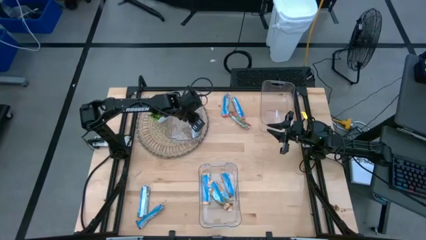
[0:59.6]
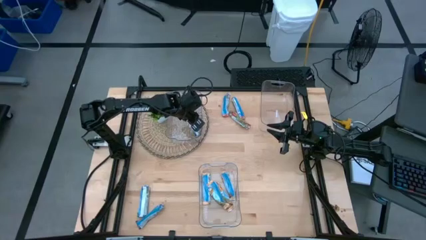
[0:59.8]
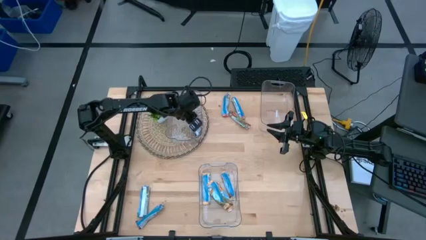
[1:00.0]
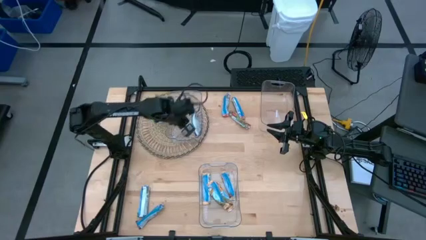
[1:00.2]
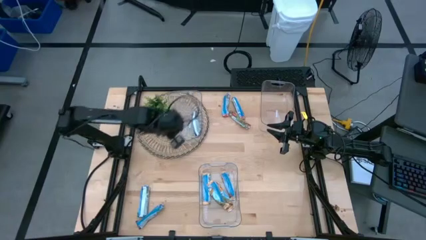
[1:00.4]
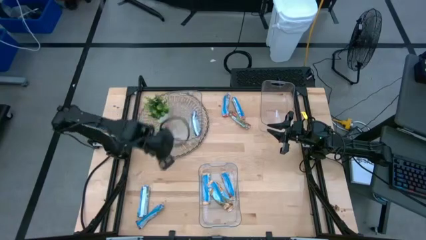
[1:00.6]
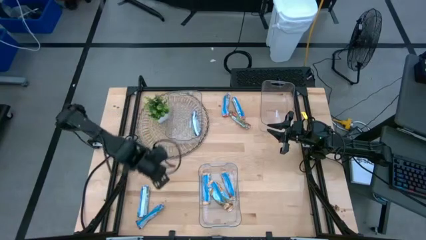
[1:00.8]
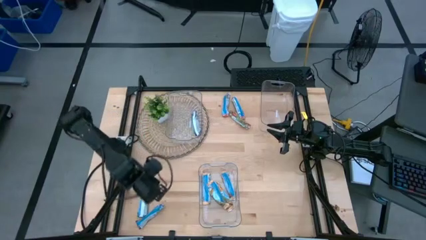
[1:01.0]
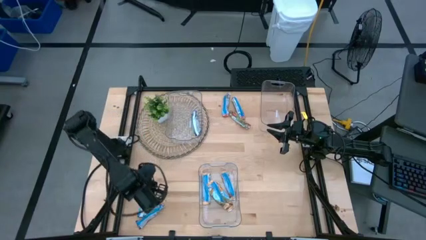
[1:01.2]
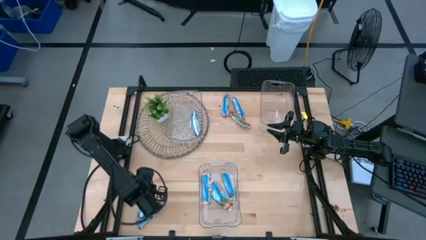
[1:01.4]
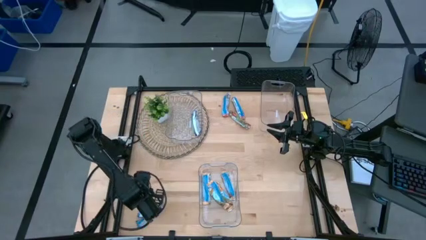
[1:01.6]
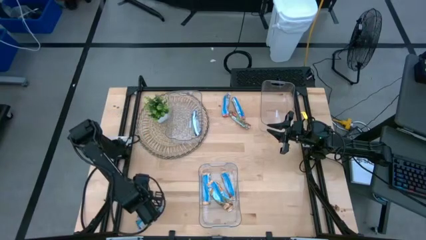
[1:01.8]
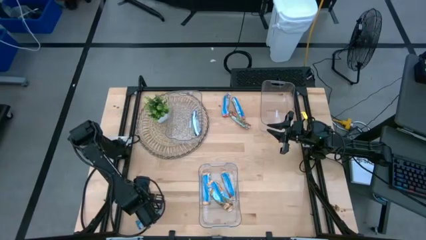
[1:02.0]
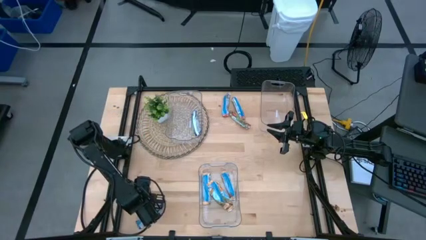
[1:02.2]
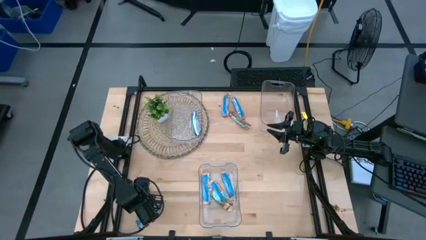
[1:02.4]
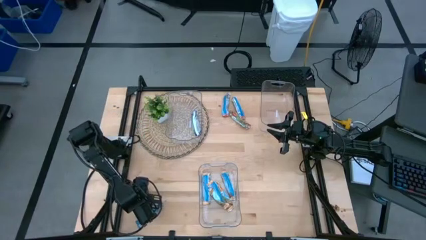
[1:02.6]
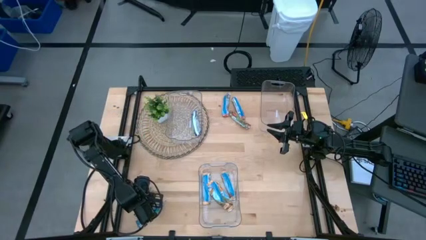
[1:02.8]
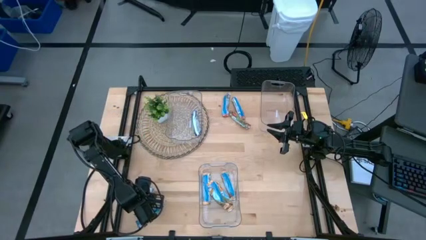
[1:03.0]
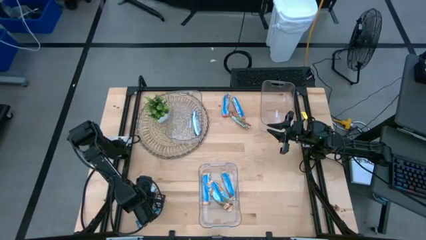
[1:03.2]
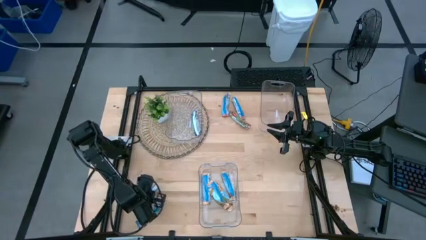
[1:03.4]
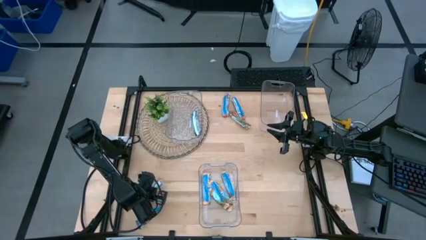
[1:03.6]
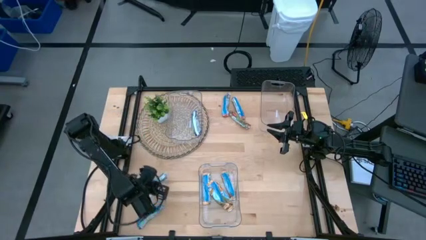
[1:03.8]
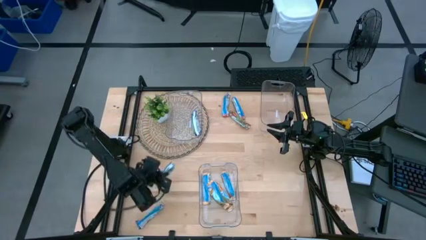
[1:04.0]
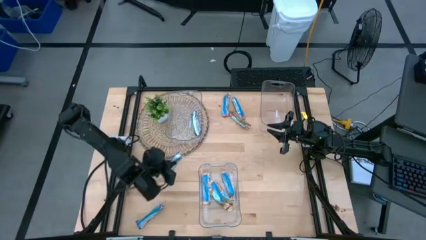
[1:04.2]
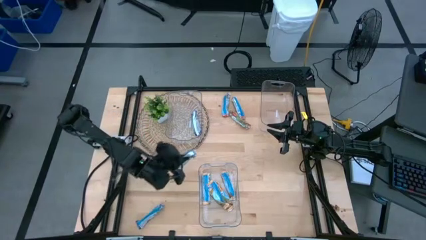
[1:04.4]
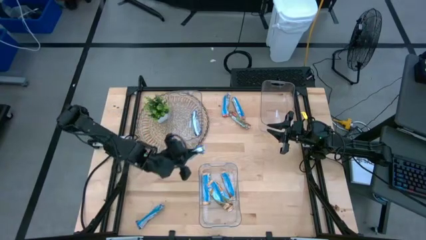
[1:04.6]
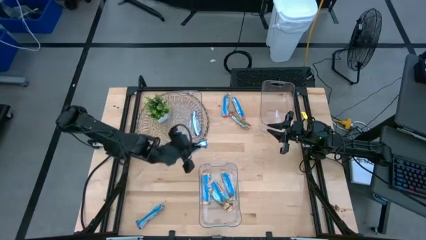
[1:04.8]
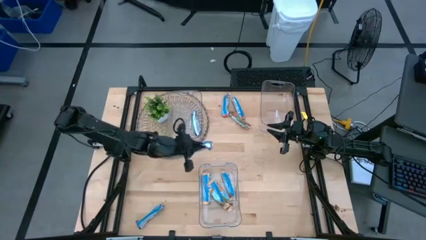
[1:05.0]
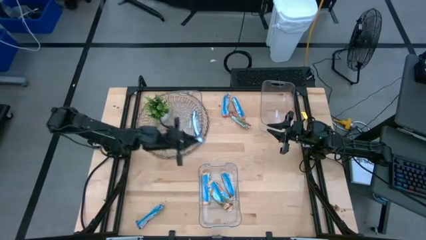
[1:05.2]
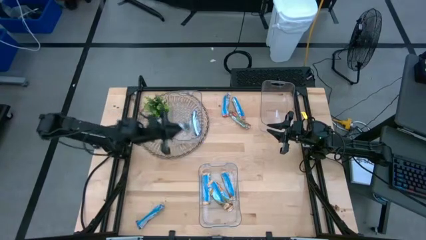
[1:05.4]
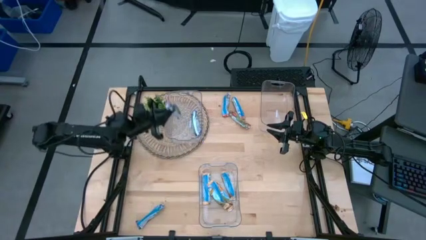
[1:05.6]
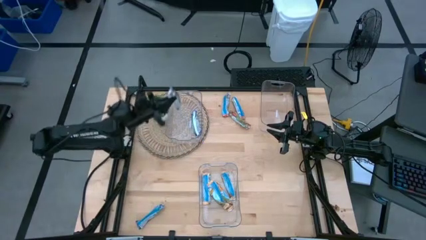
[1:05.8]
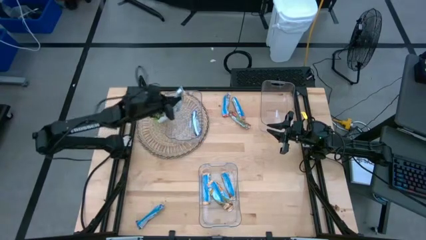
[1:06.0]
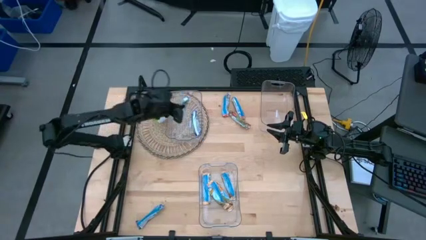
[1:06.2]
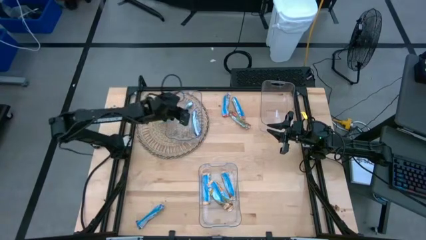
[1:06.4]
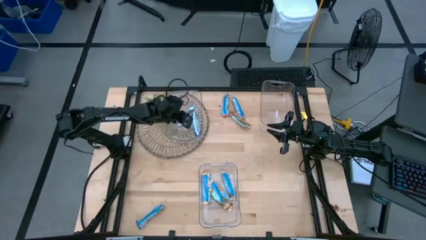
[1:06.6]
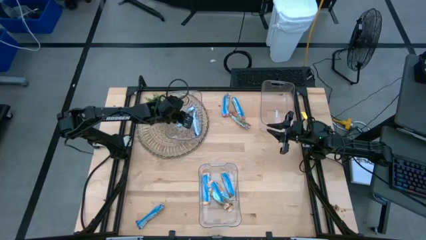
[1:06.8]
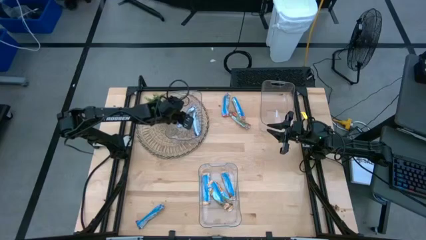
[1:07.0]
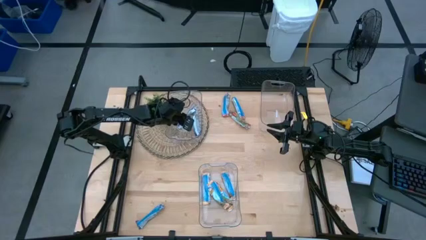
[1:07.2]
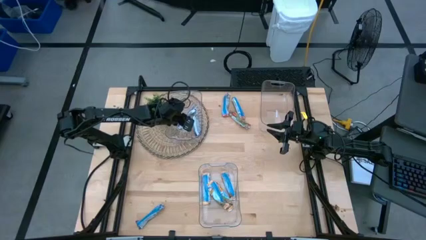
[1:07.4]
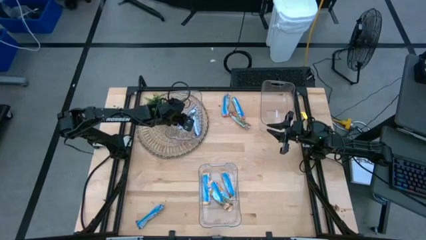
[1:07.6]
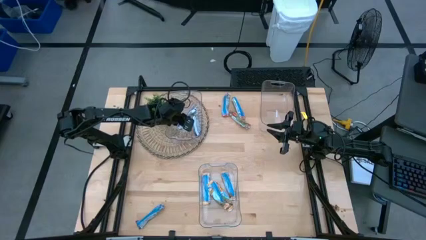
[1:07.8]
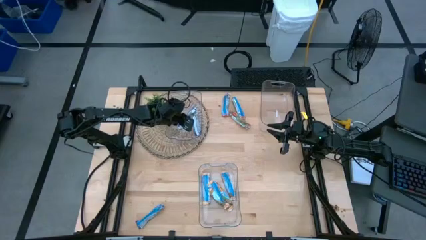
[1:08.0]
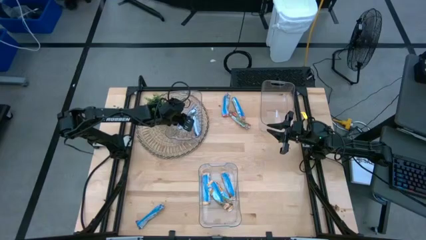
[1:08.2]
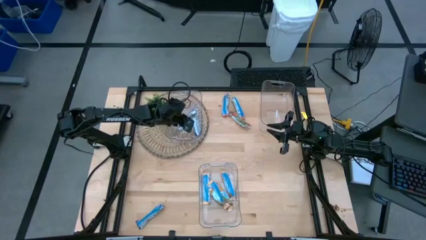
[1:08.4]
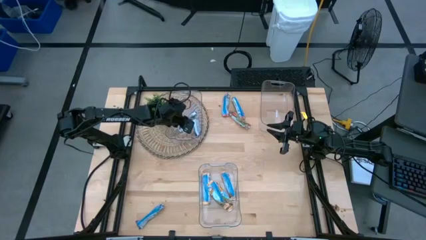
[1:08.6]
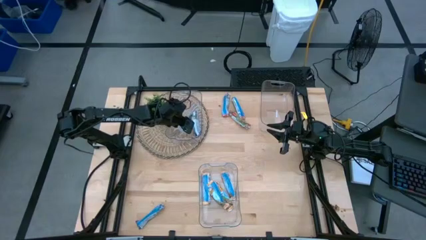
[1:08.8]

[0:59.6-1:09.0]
Task: Pick and place Granola Bars by type
Put the blue granola bar into the top left transparent bin

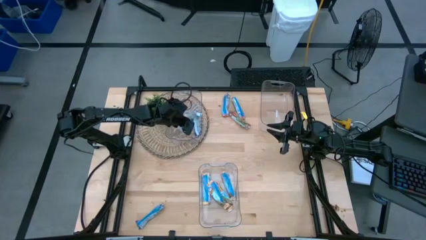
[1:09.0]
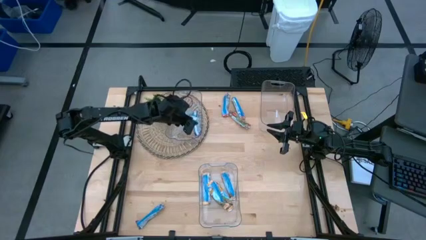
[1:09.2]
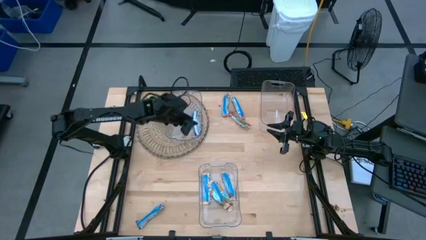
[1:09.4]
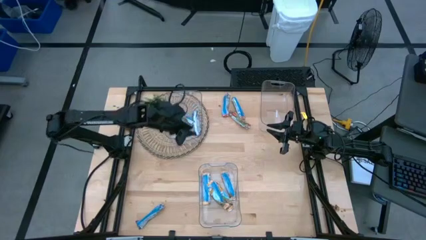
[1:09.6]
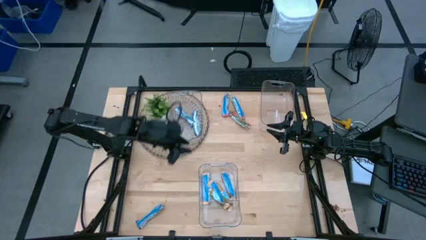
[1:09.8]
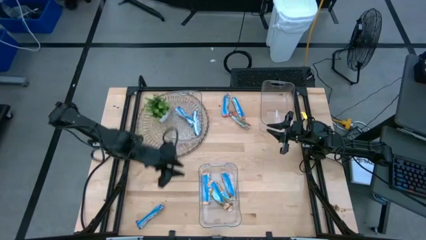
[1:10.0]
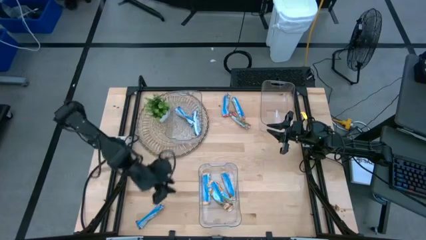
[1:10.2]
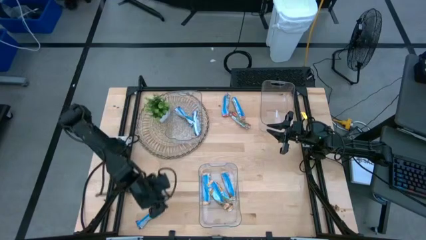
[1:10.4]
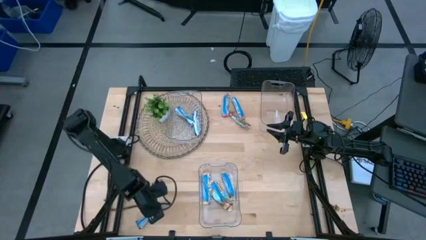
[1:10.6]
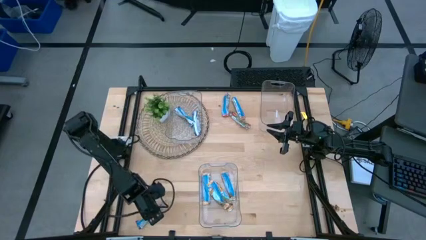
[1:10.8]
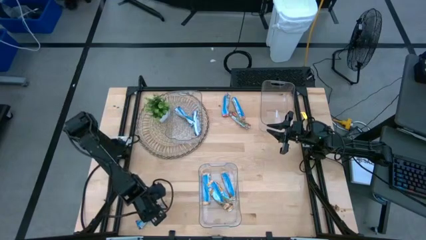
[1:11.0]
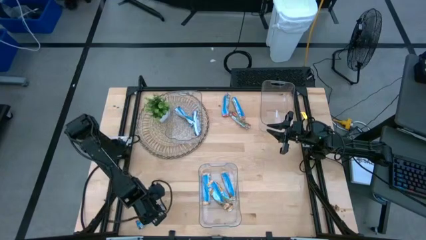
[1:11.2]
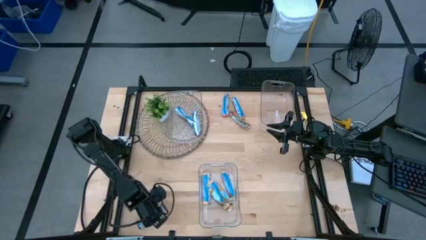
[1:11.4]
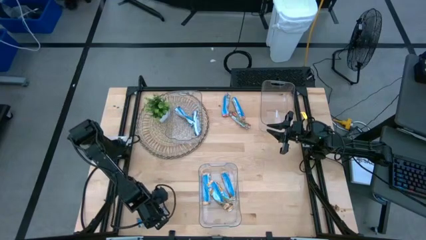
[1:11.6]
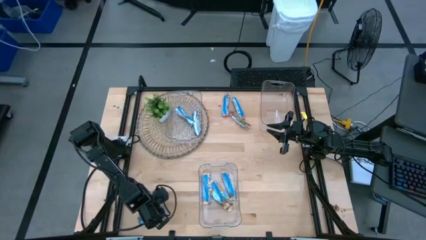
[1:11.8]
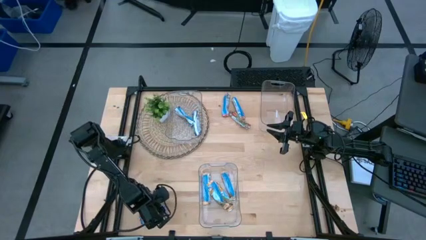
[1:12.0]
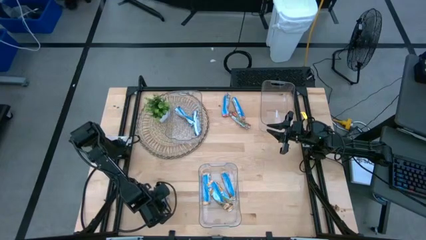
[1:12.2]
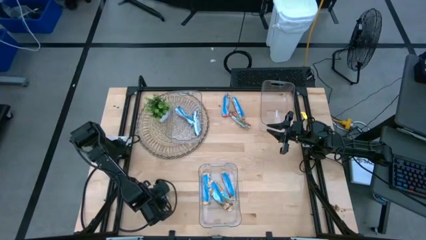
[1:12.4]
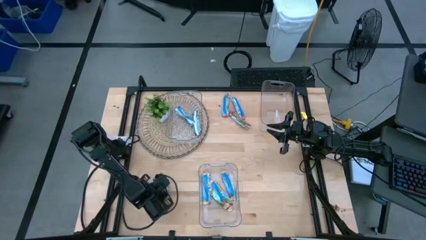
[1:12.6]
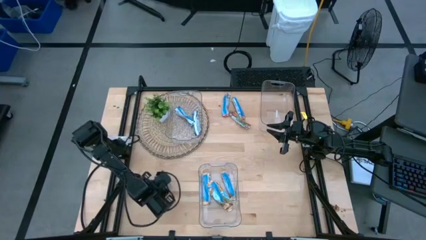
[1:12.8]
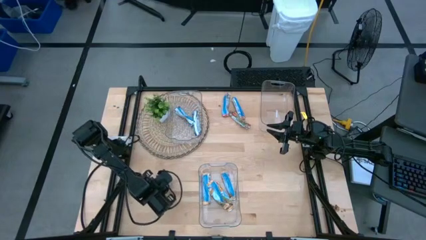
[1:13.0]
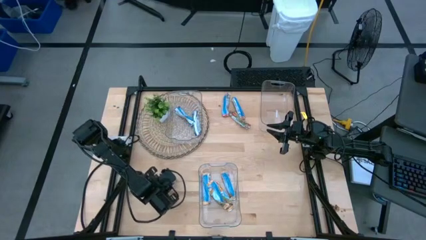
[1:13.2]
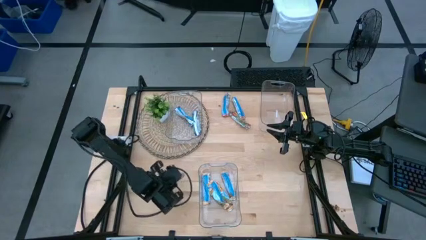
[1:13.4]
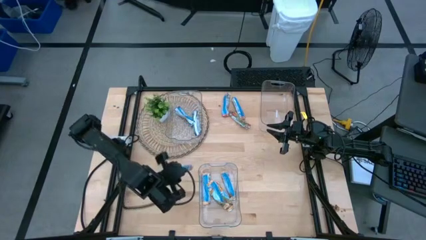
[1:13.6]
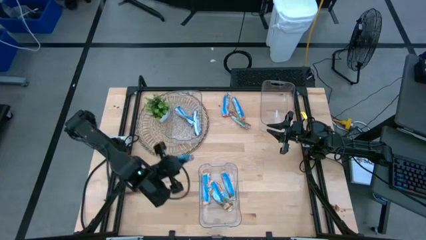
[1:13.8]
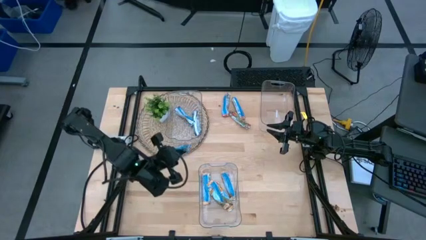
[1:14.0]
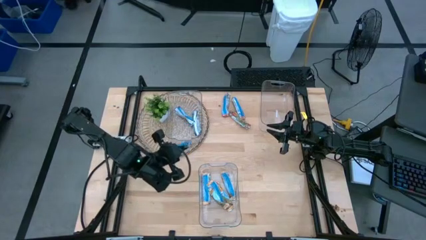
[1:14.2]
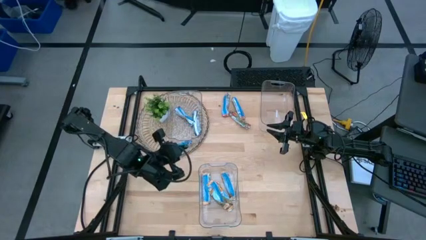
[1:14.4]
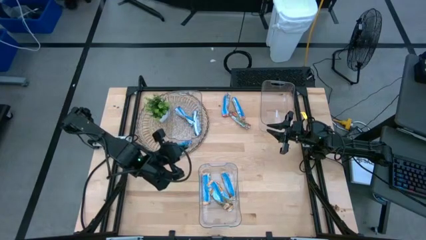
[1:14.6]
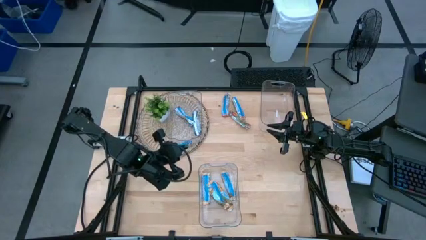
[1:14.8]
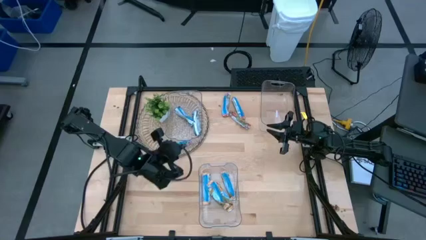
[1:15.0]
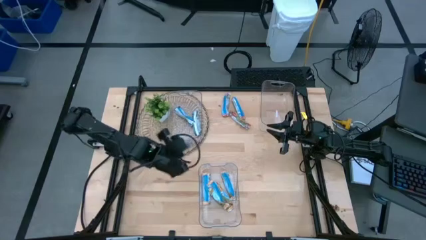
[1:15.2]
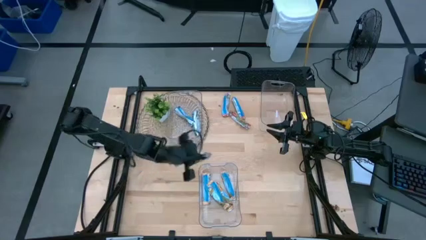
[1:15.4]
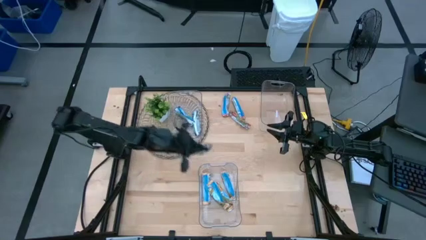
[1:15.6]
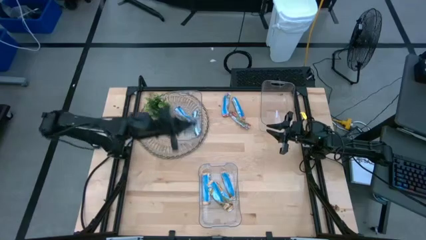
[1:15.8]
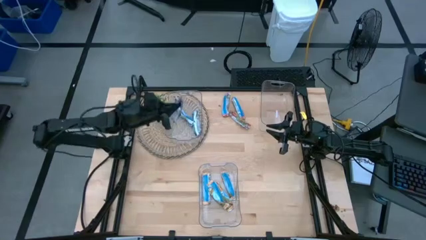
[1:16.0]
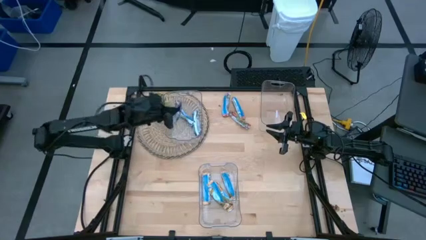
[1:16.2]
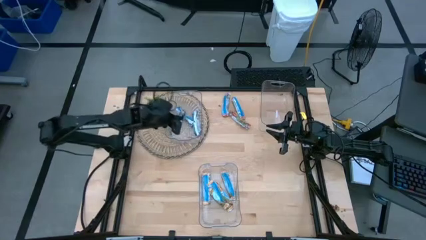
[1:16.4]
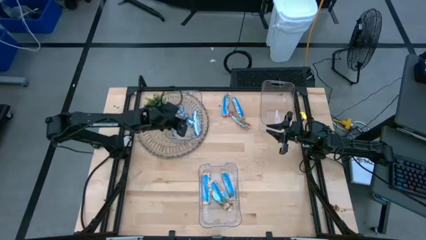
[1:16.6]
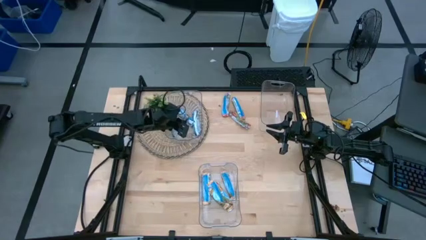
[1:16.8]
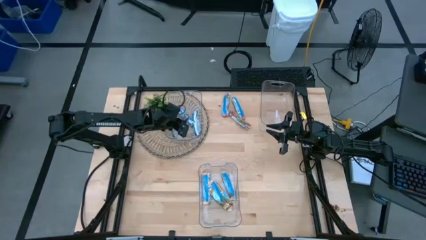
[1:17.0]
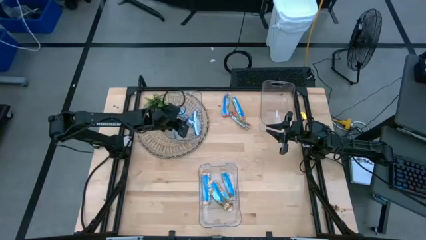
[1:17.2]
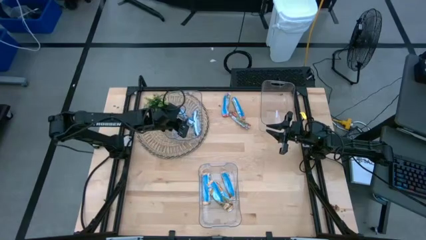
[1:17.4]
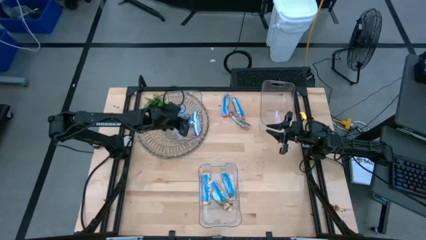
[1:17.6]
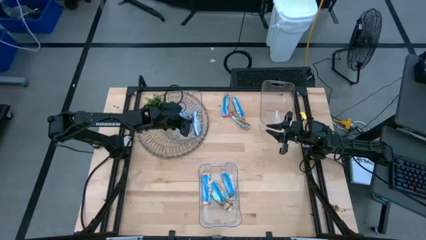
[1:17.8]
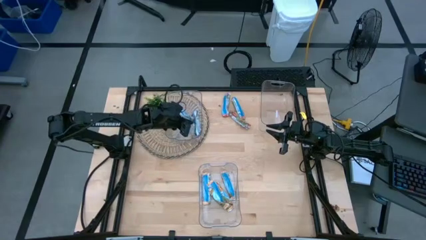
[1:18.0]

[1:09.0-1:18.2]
Put the blue granola bar into the top left transparent bin
